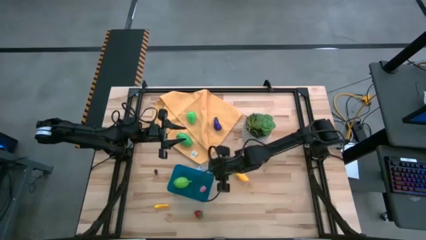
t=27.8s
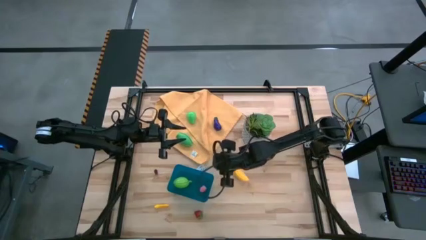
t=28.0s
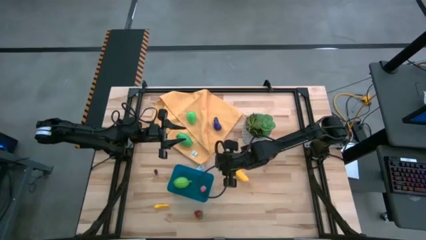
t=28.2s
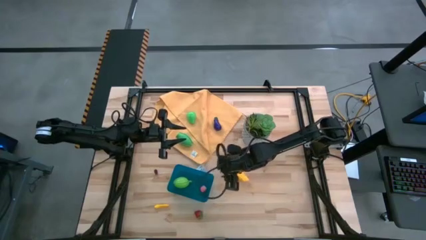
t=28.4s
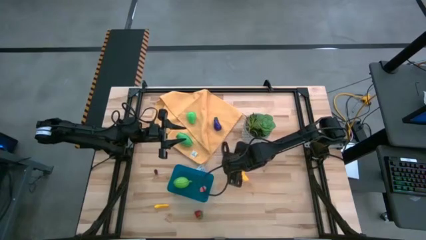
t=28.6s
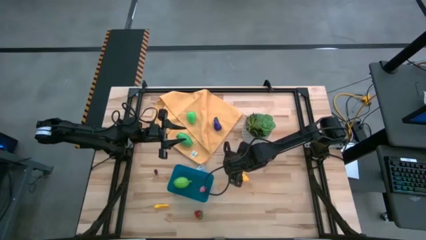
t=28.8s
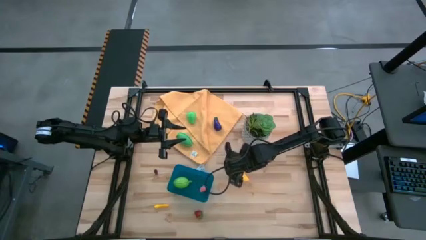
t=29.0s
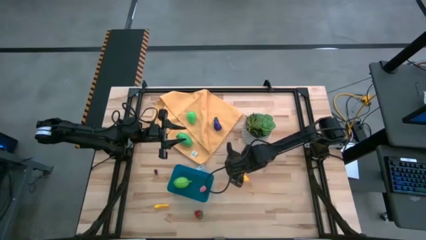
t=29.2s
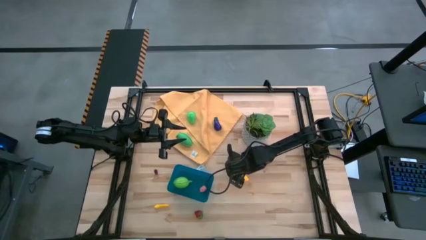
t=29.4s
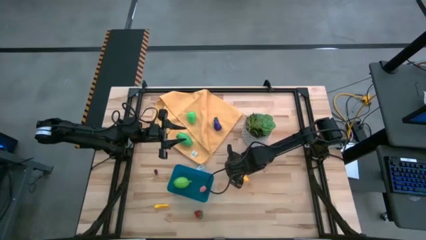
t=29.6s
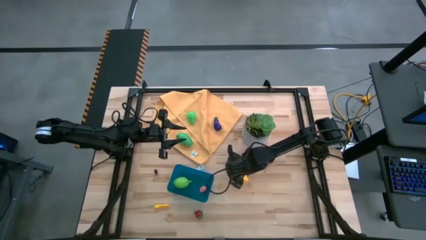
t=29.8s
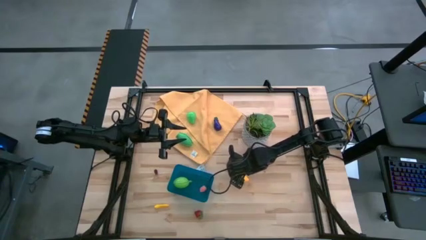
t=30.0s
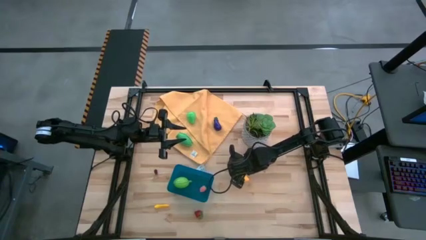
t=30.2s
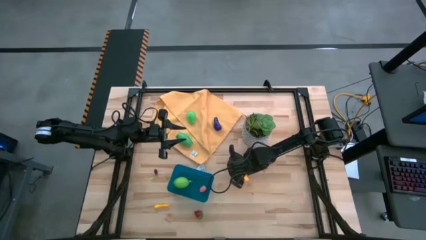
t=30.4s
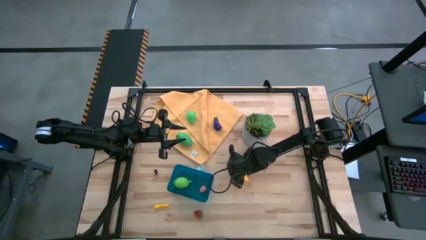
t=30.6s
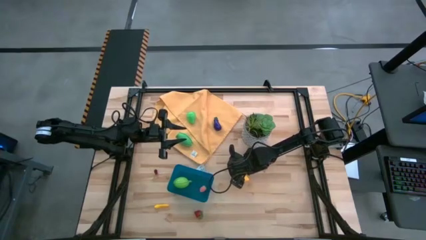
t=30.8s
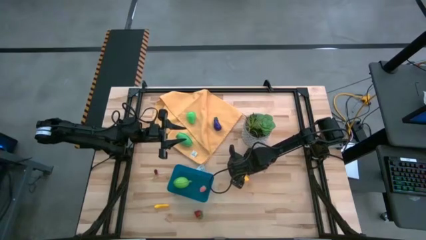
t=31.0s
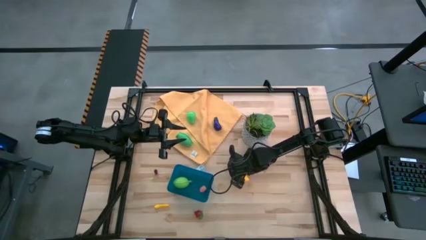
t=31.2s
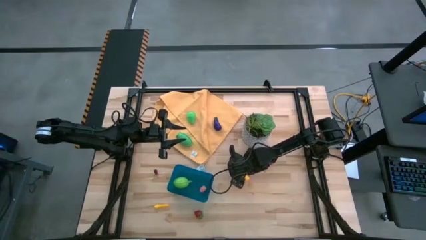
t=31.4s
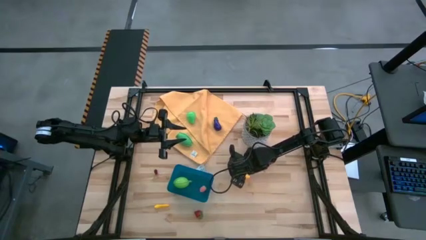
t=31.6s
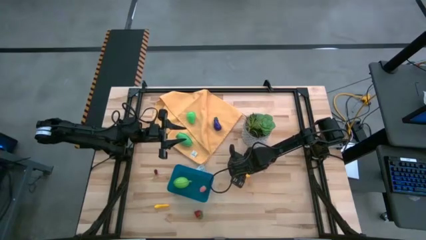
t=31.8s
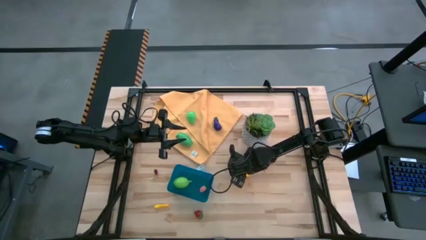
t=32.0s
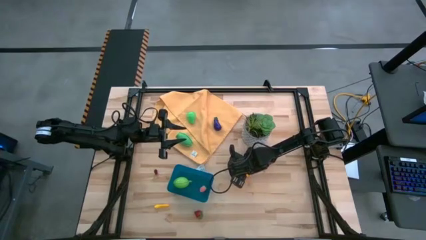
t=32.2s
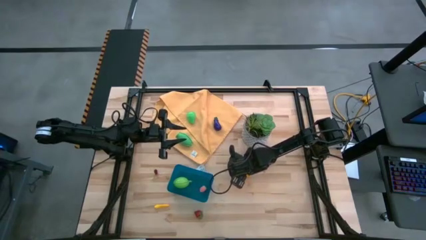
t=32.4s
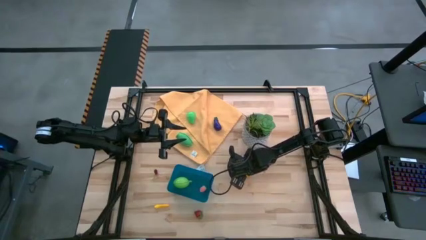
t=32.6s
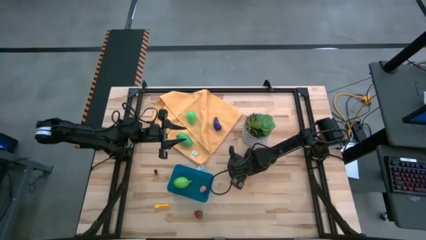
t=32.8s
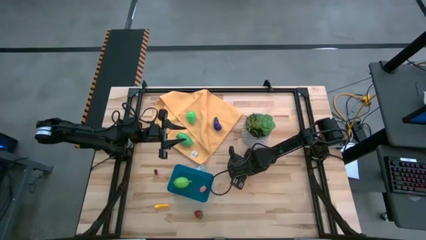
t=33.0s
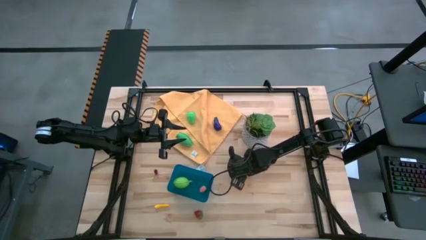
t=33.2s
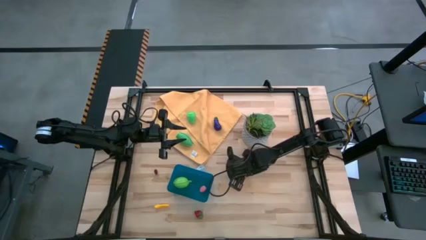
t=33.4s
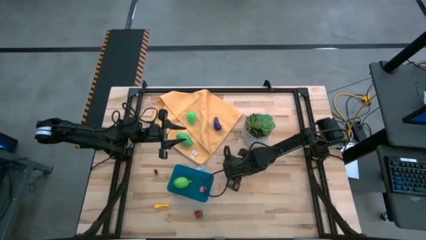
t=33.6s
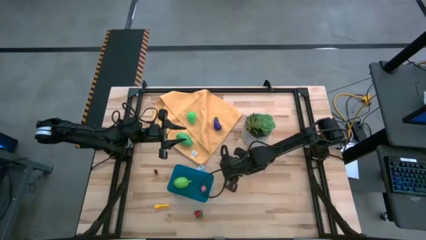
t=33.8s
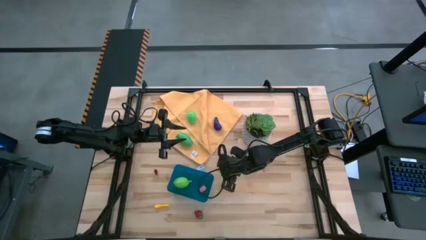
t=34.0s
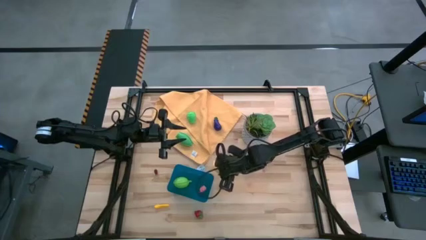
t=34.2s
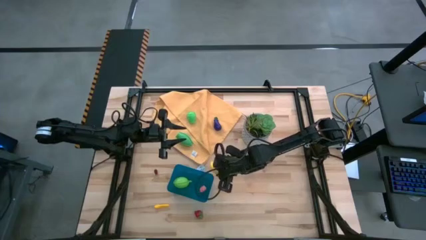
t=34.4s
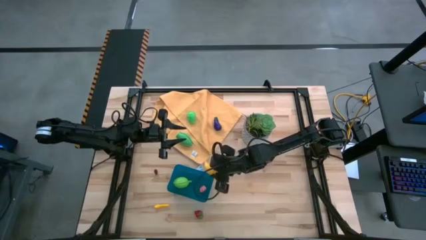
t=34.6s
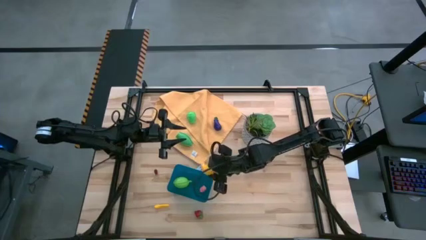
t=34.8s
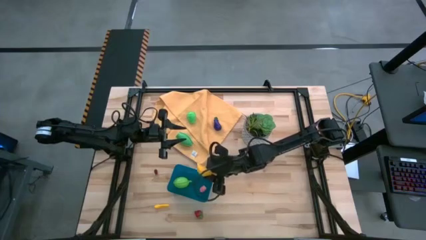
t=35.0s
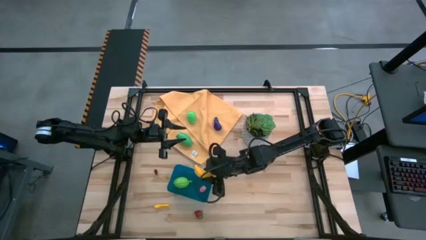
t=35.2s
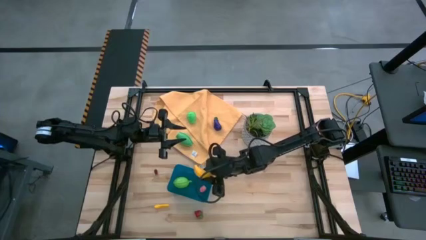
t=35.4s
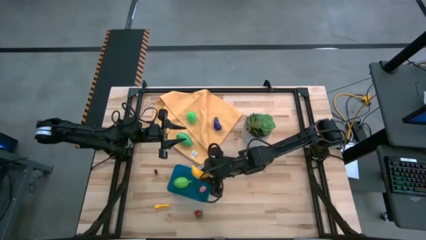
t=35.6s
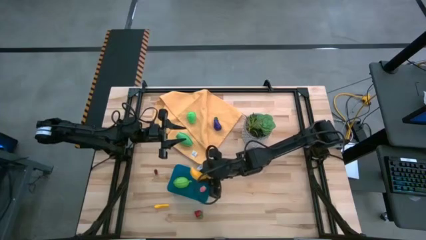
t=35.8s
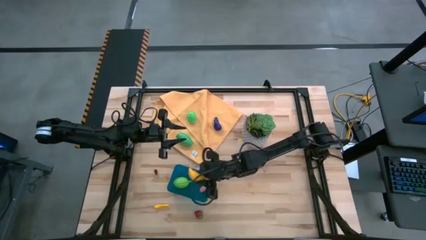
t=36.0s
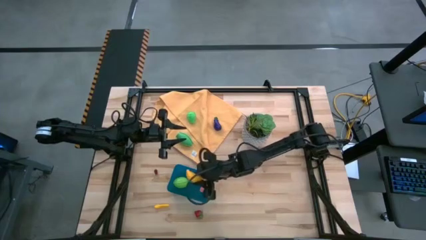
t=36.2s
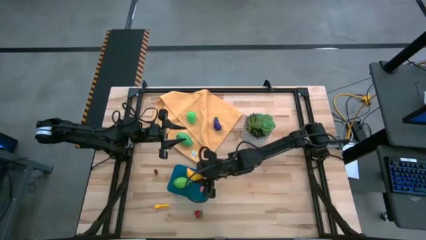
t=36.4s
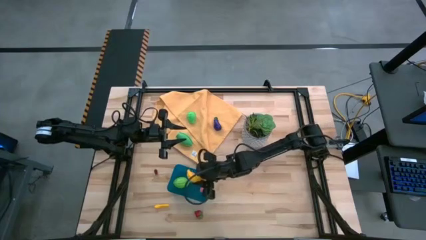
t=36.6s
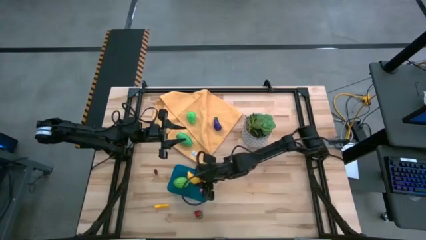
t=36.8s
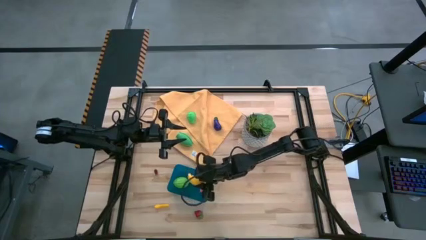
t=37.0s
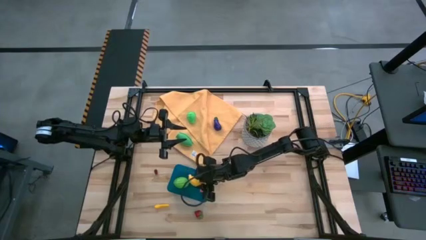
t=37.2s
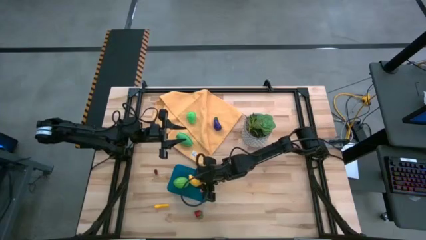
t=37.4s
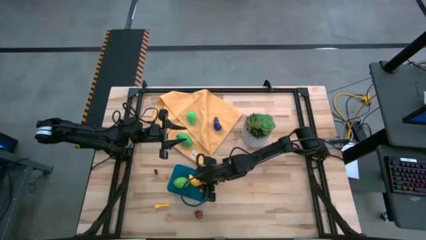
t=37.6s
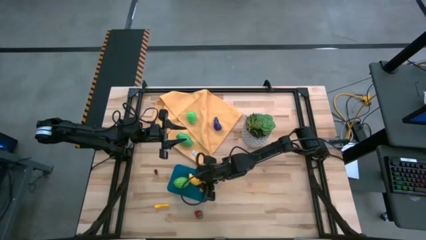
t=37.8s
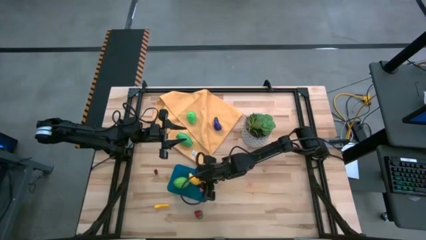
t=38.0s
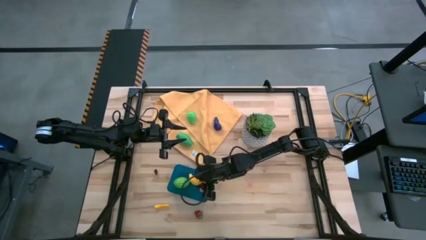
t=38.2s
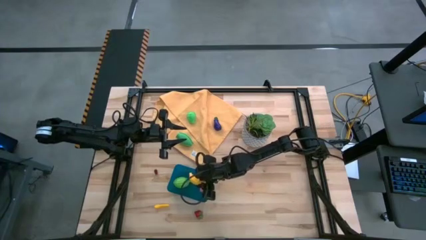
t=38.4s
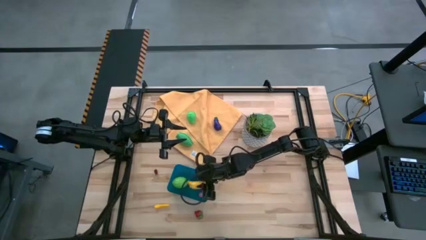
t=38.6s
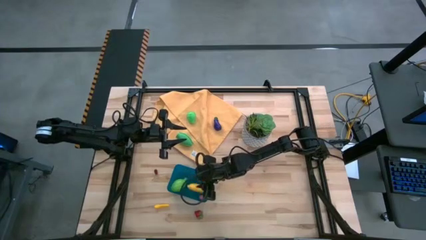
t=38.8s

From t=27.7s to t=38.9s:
Task: Pick and placing Produce into tupperware
Put the banana into the blue bin
